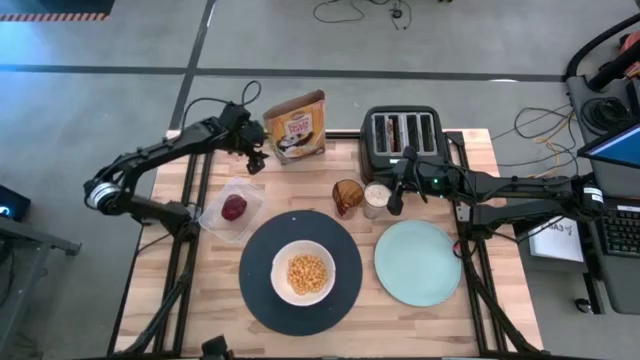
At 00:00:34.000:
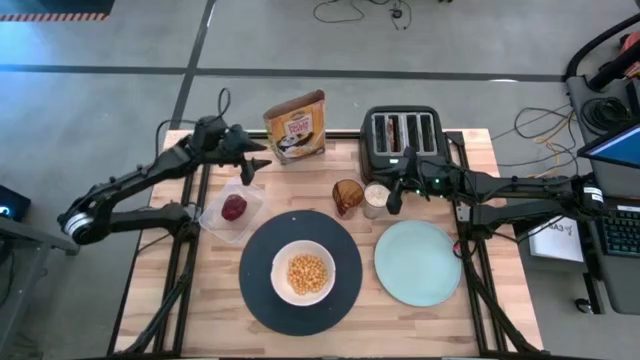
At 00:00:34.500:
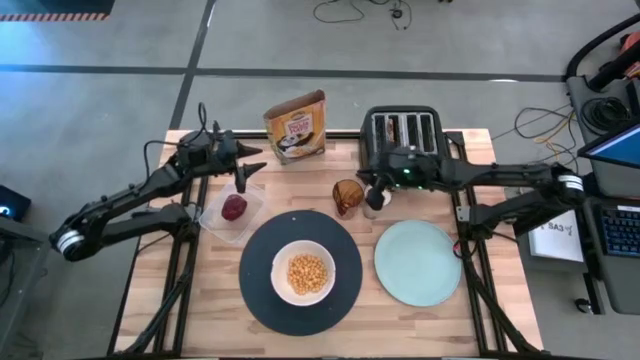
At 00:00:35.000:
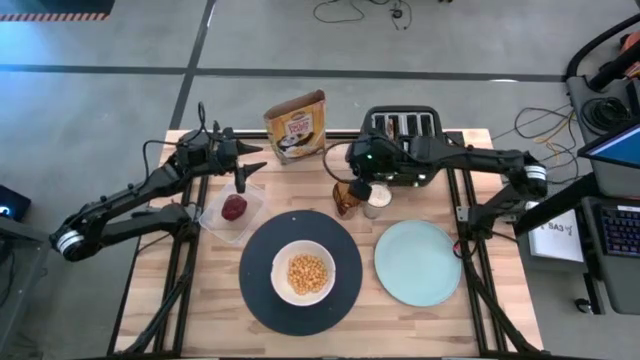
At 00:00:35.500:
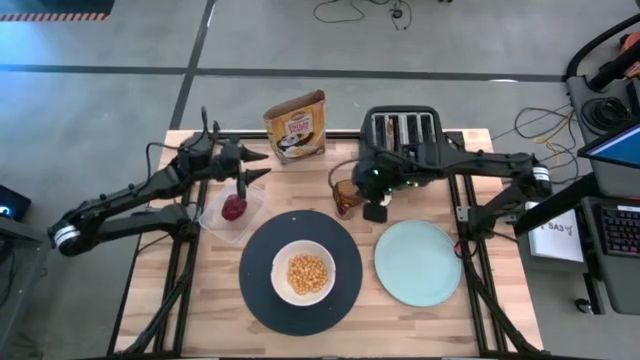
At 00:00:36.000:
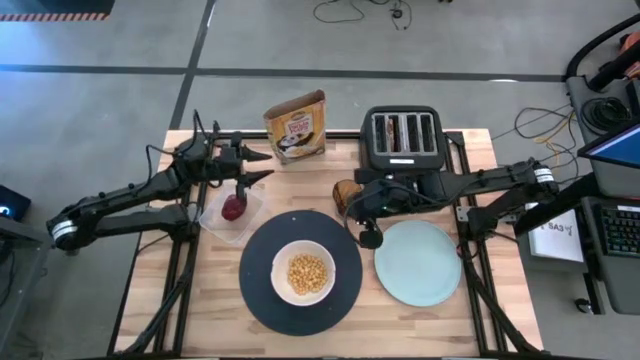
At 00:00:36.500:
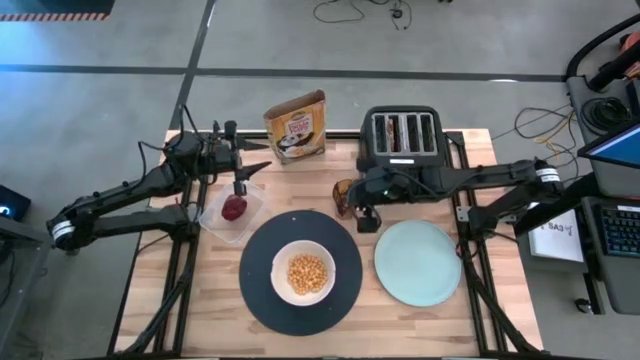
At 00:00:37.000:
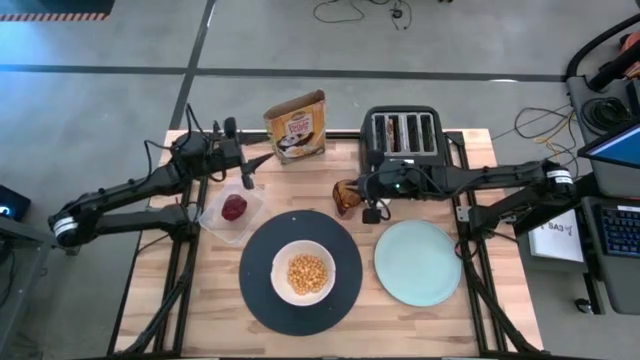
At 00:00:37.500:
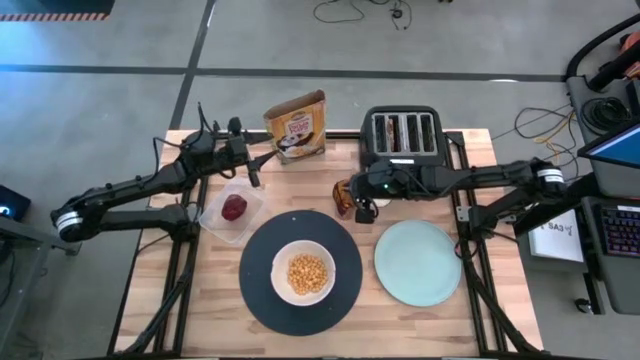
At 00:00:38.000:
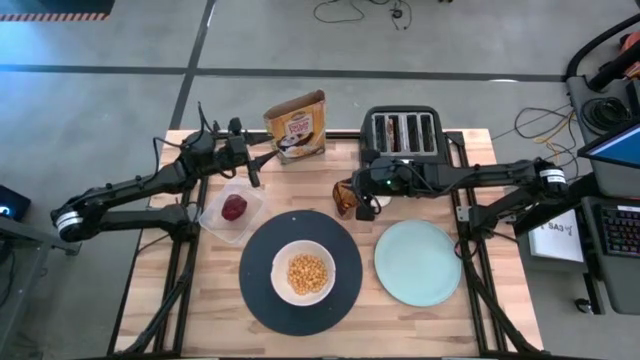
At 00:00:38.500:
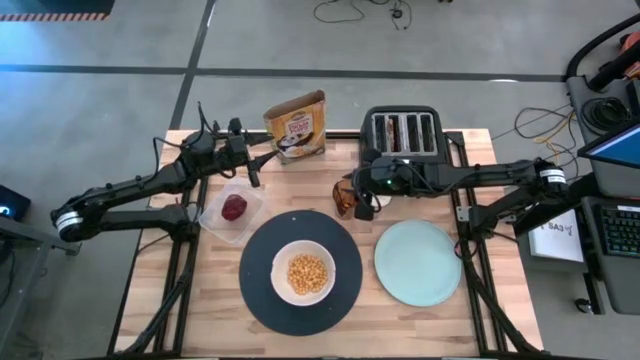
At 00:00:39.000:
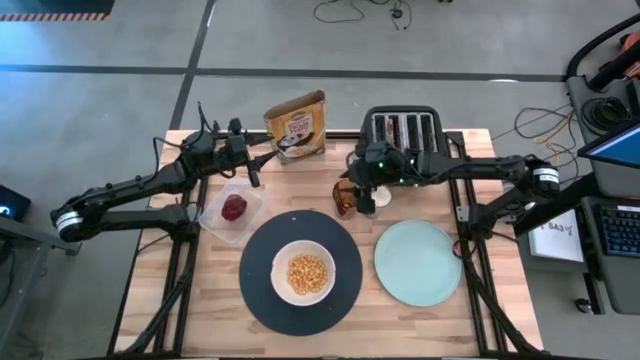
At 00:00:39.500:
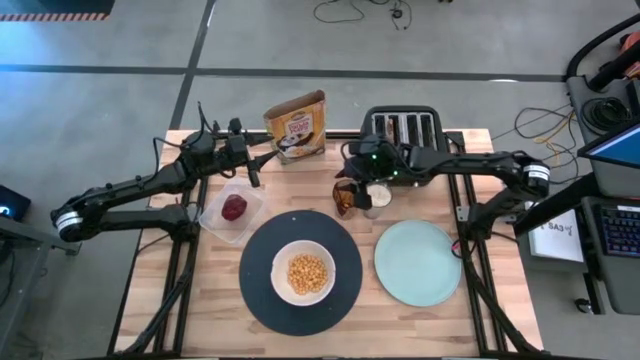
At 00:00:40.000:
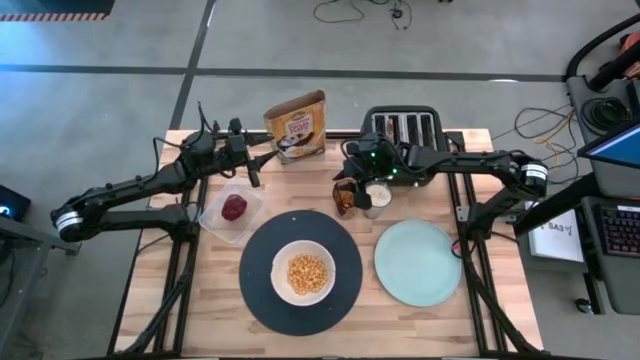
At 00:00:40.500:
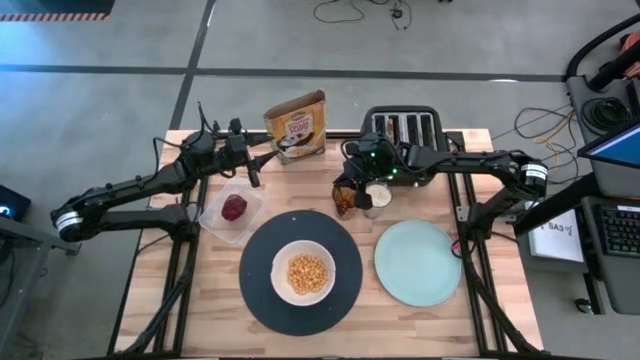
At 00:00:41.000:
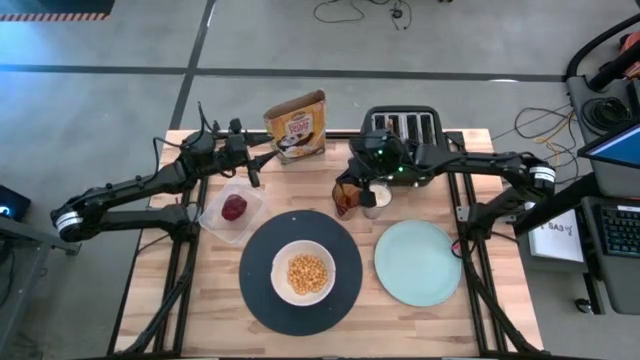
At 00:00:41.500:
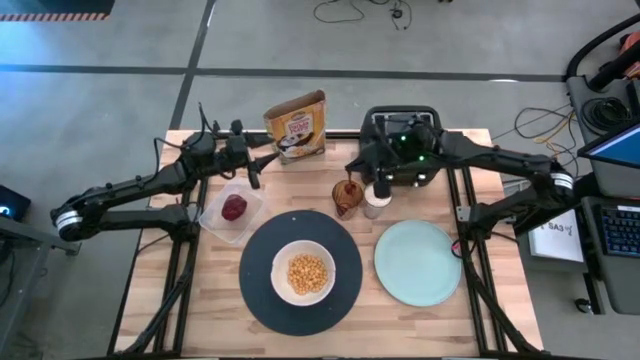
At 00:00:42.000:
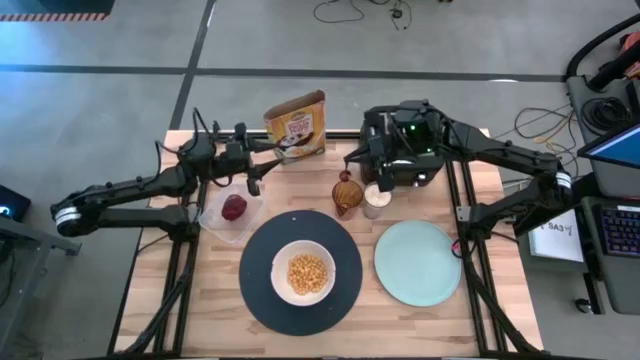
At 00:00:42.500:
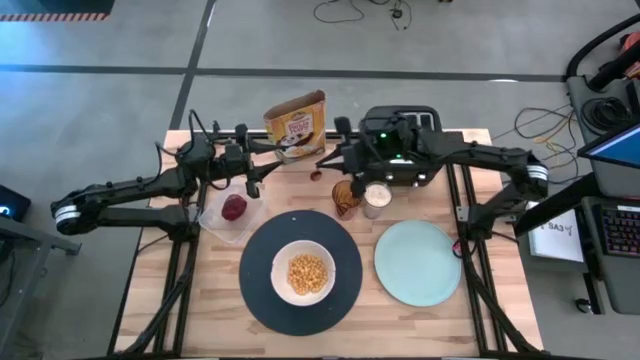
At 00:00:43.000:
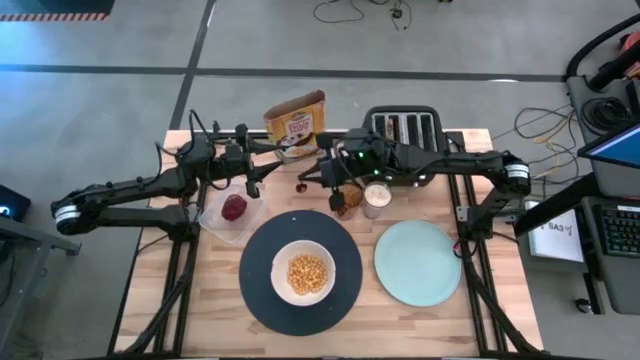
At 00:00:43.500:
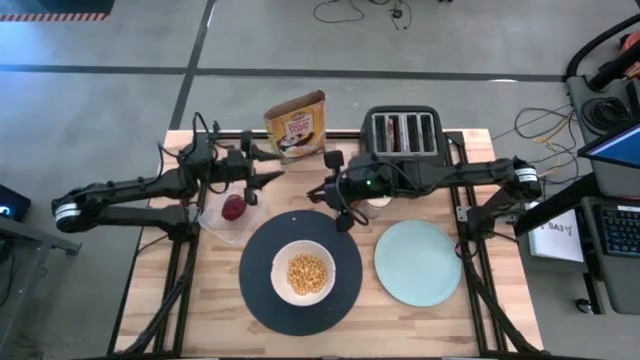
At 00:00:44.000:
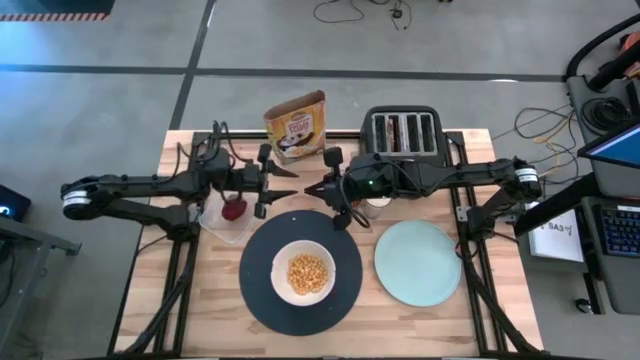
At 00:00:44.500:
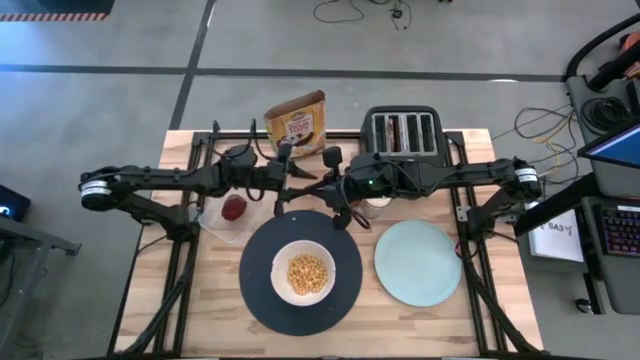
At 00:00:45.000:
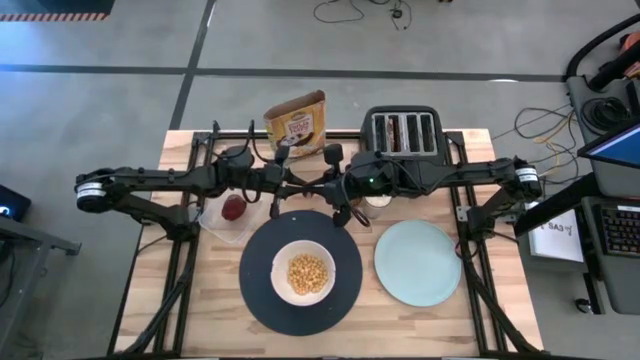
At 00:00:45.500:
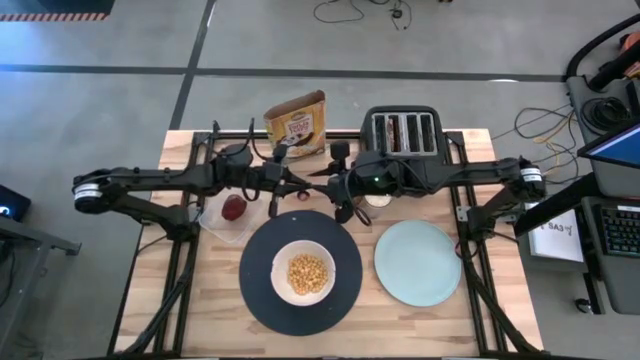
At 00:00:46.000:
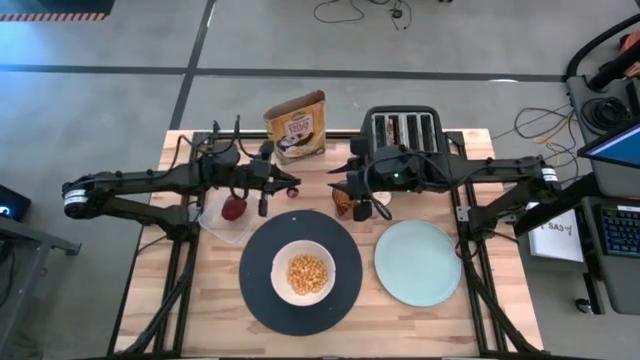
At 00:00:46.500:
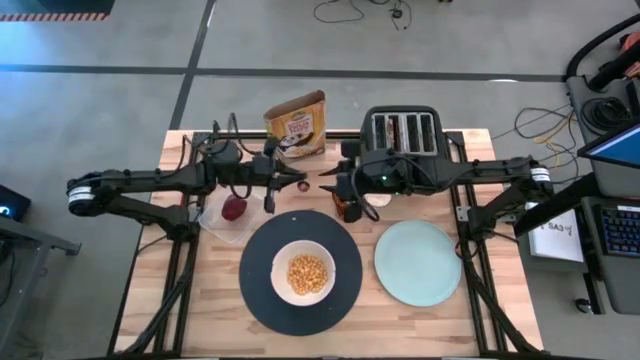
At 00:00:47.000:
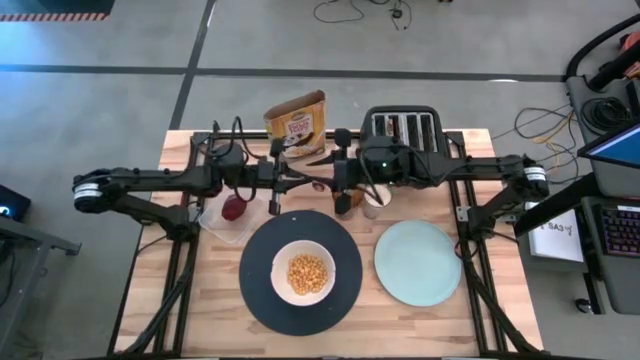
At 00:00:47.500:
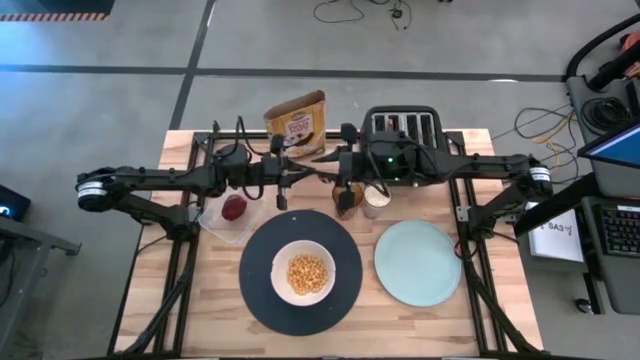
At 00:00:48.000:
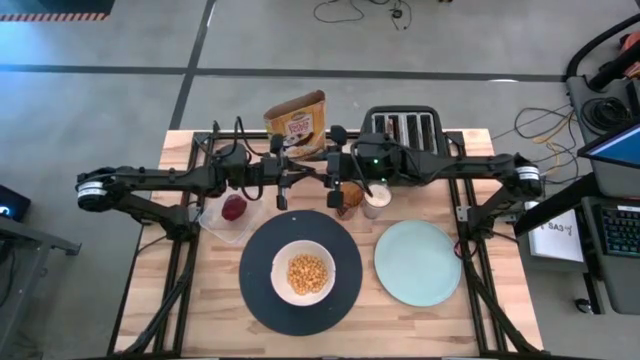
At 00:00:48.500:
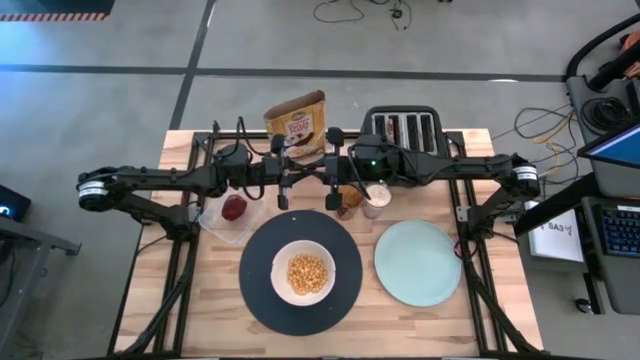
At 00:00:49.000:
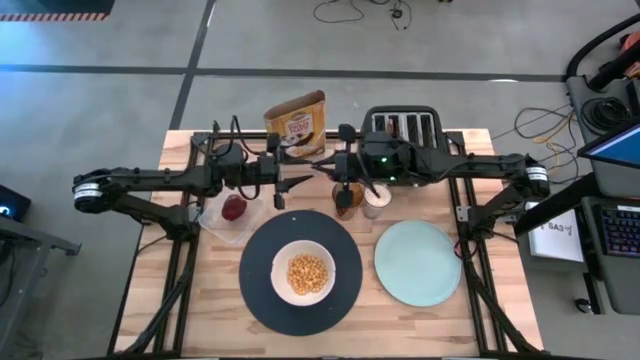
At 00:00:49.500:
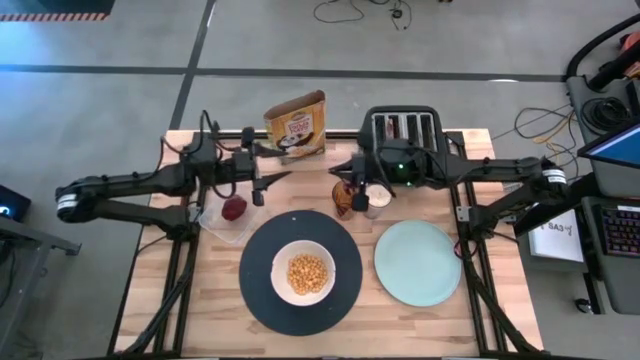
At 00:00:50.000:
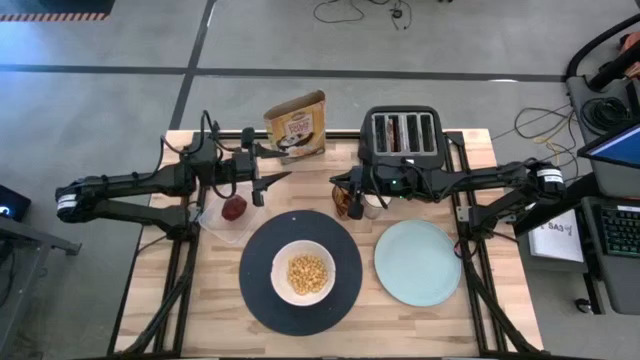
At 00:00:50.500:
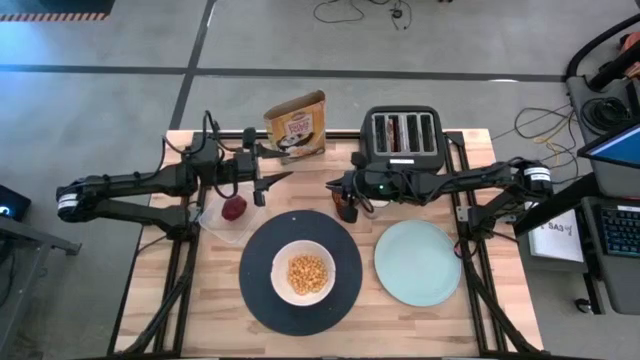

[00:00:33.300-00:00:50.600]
Task: Arrange a breakfast setting
Adjust the blue spoon in the orange cup

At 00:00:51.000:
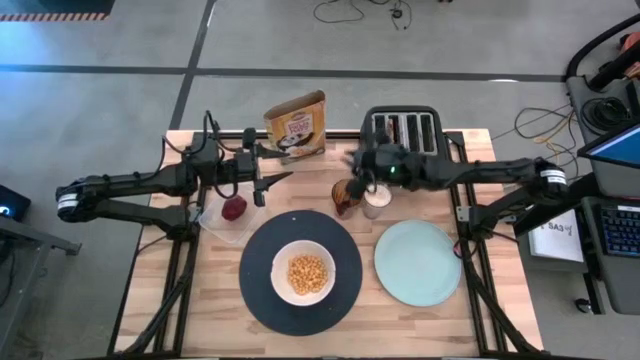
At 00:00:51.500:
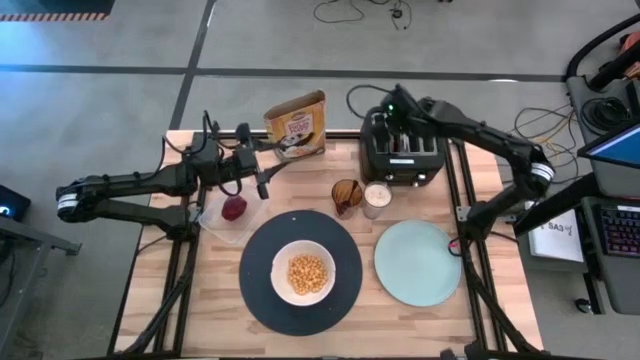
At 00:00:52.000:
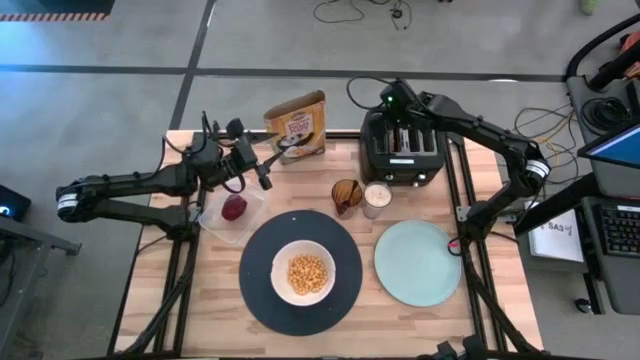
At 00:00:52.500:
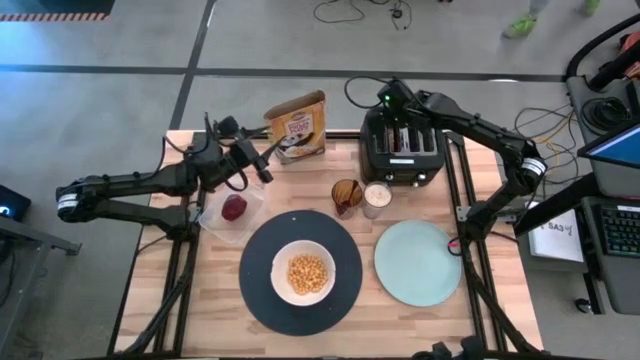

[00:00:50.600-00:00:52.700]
Put the toasted bread on the blue plate

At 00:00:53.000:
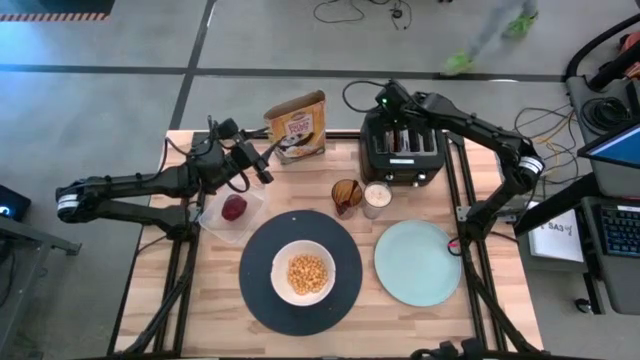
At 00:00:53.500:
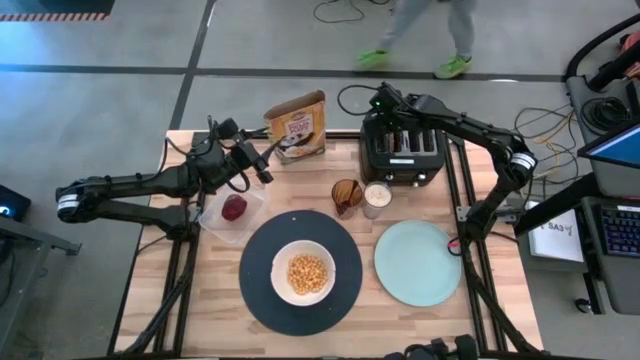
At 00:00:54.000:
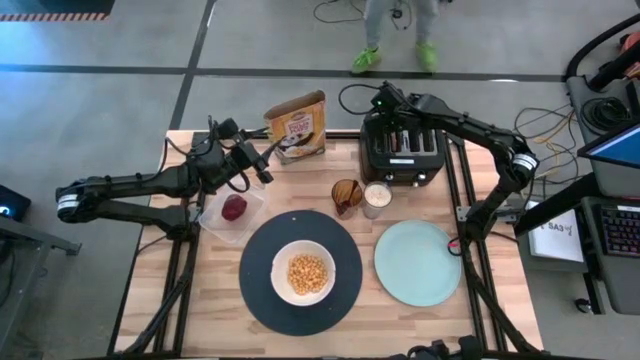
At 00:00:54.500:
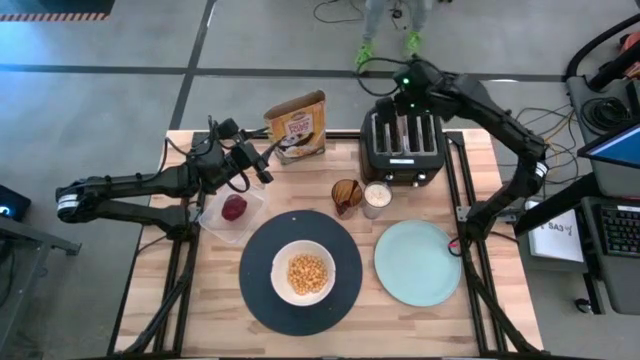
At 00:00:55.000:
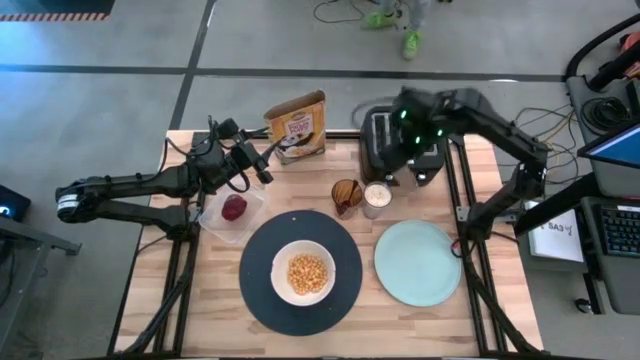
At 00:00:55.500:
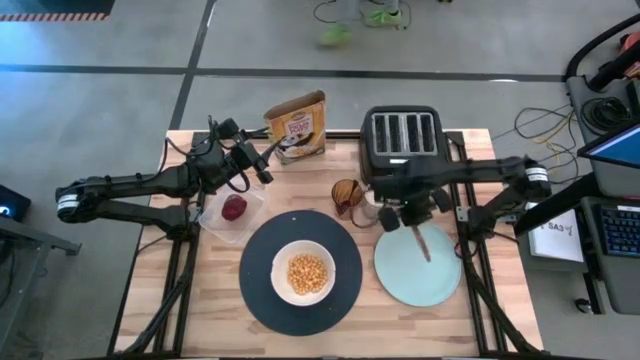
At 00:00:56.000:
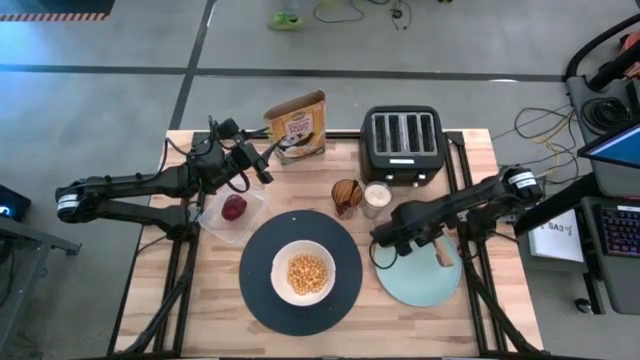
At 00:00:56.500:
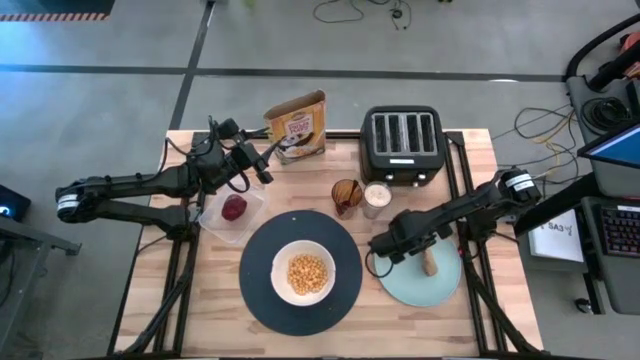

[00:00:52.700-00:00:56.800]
Put the toasted bread on the blue plate
